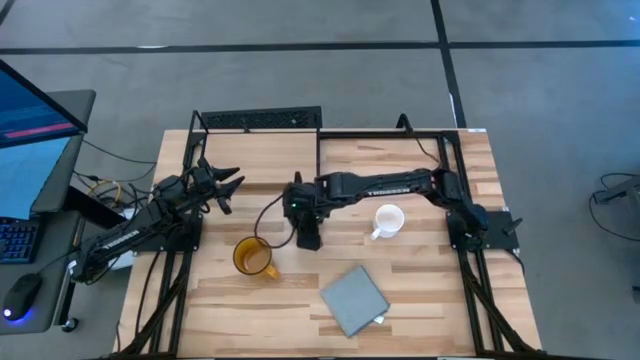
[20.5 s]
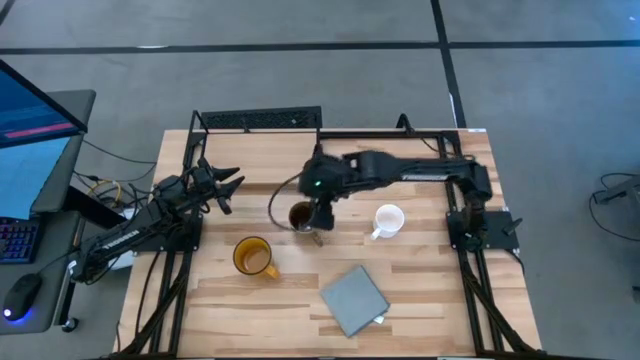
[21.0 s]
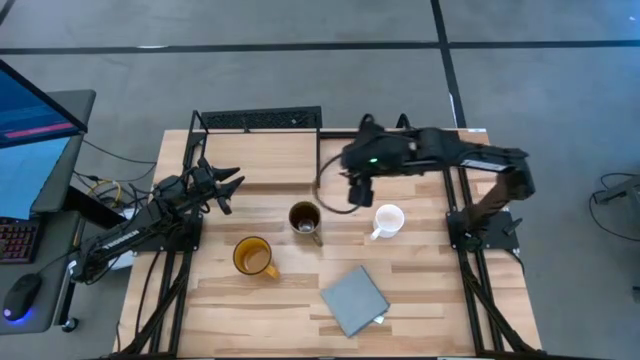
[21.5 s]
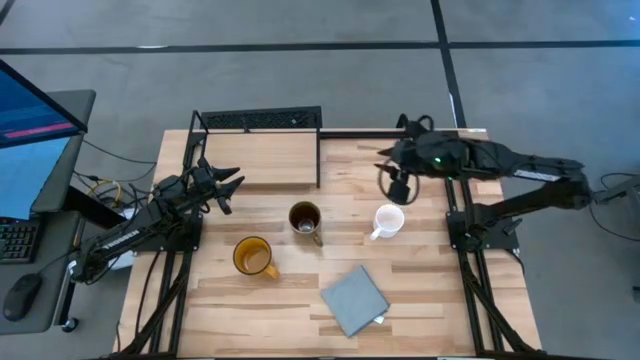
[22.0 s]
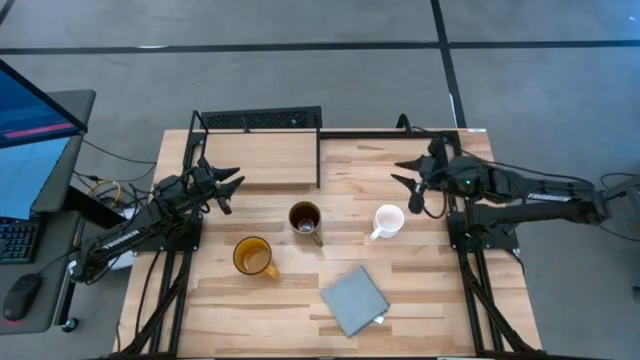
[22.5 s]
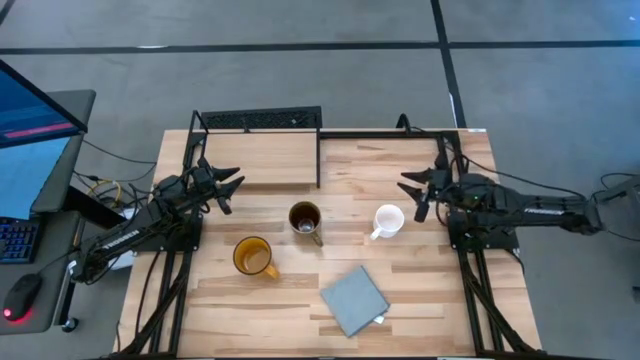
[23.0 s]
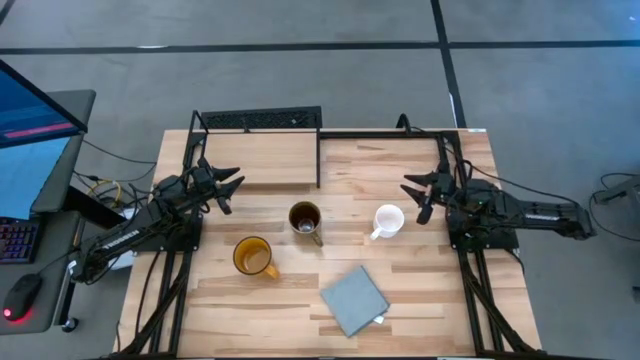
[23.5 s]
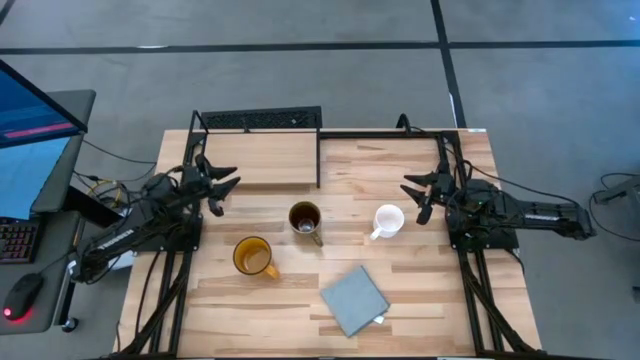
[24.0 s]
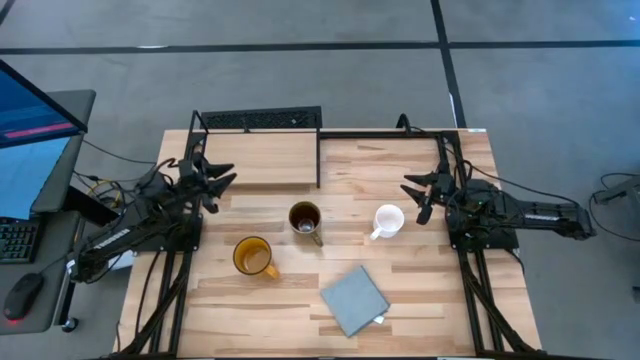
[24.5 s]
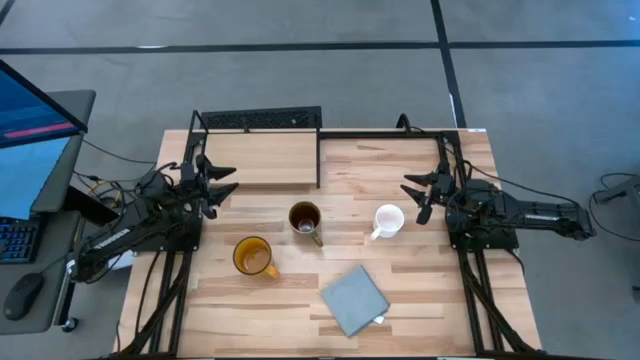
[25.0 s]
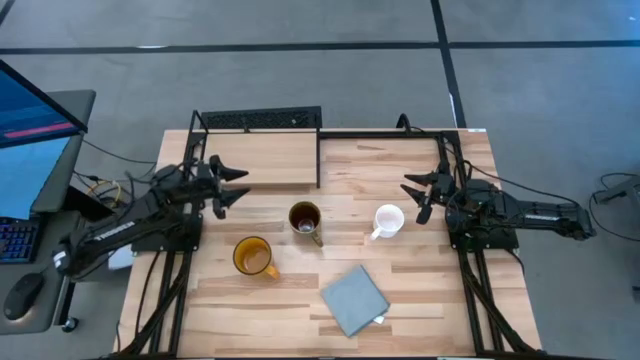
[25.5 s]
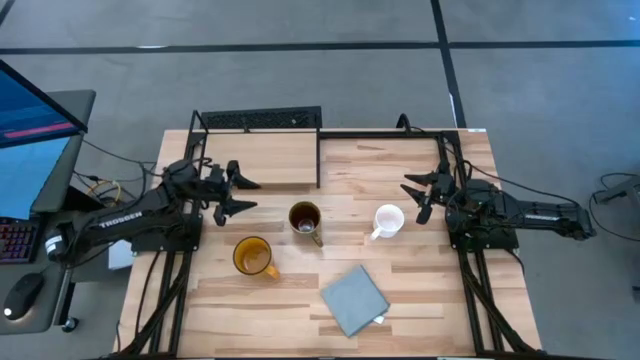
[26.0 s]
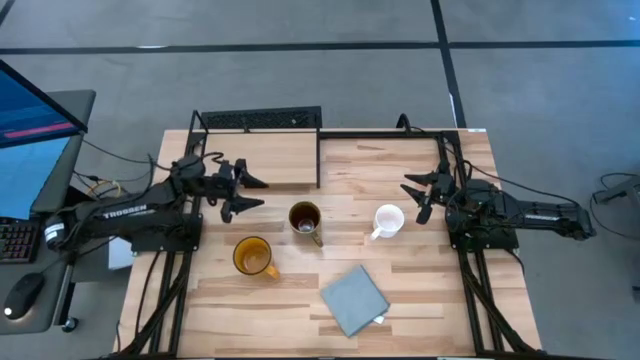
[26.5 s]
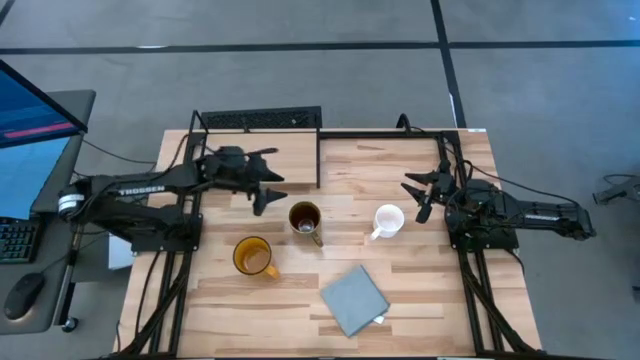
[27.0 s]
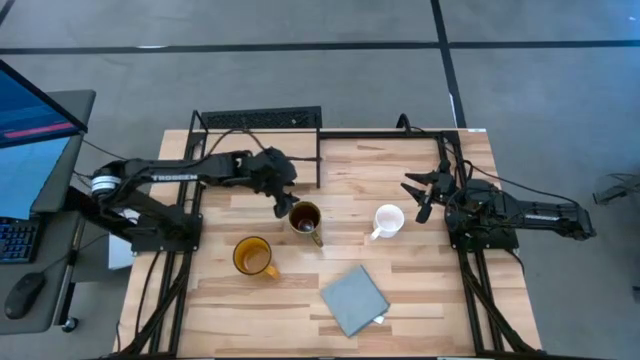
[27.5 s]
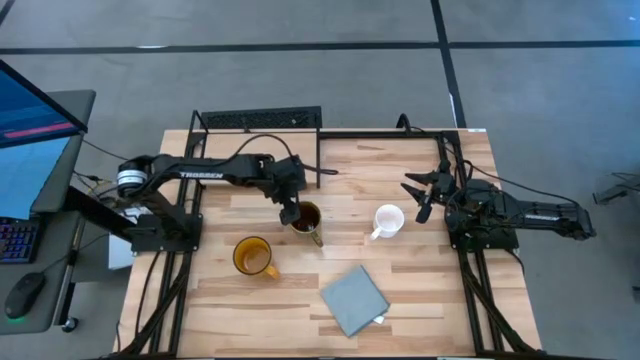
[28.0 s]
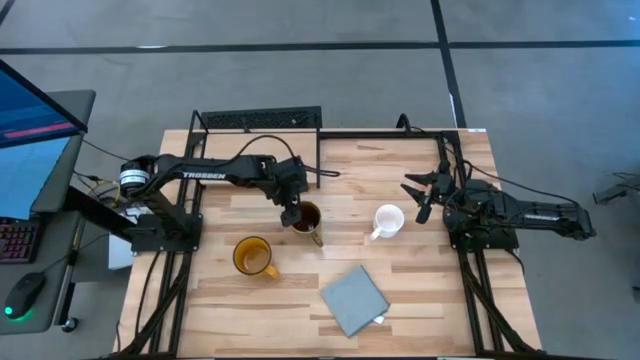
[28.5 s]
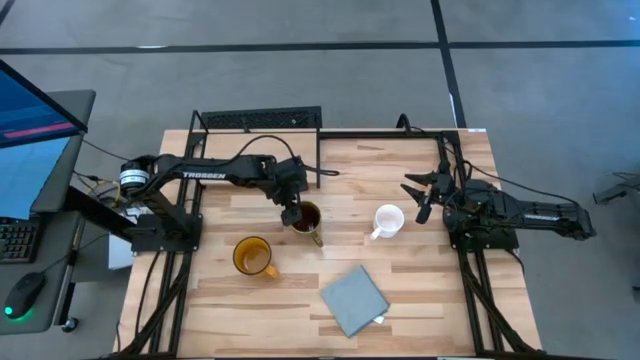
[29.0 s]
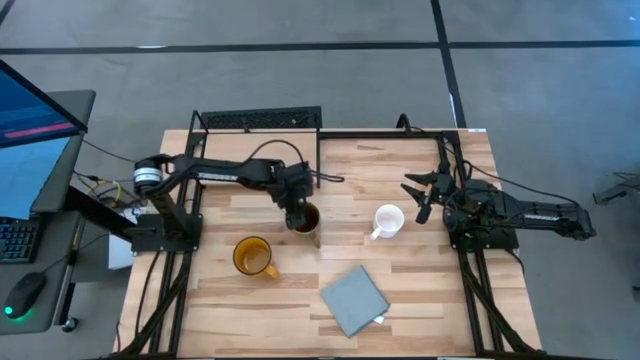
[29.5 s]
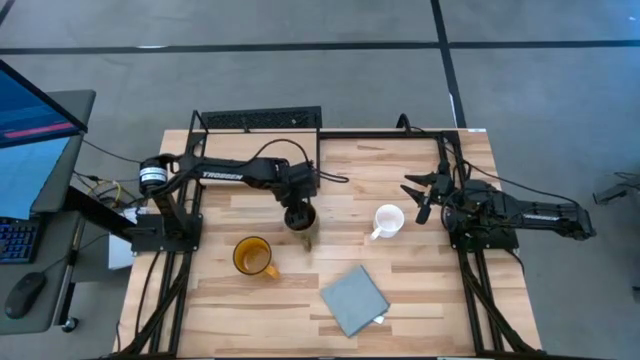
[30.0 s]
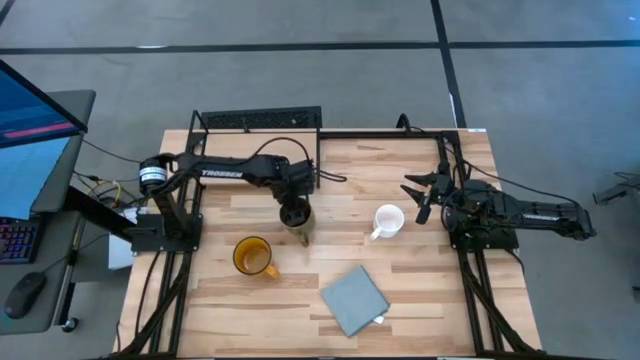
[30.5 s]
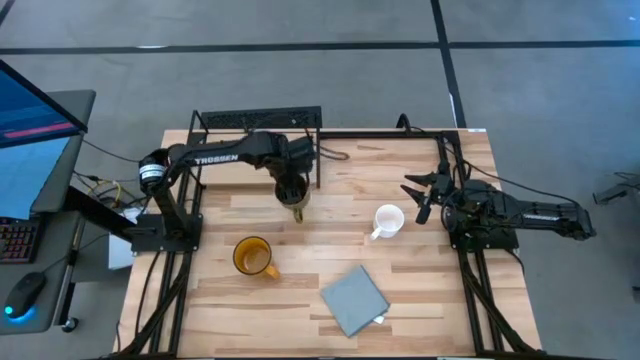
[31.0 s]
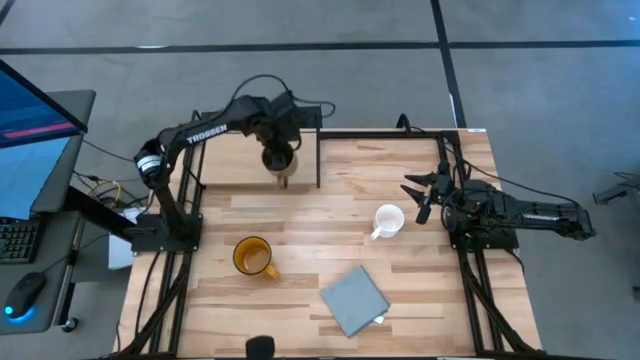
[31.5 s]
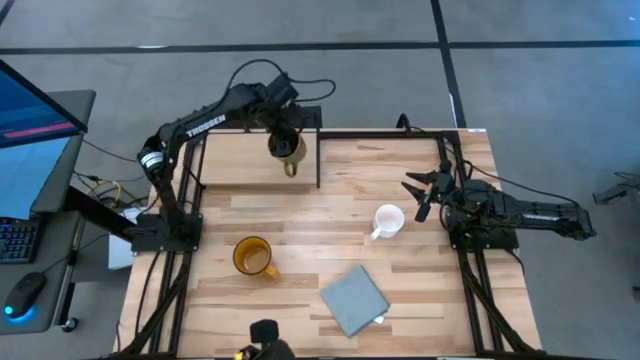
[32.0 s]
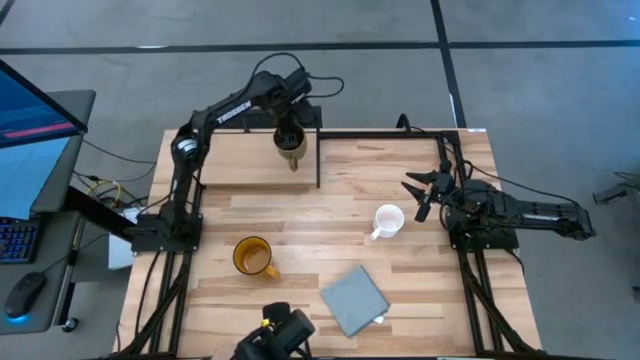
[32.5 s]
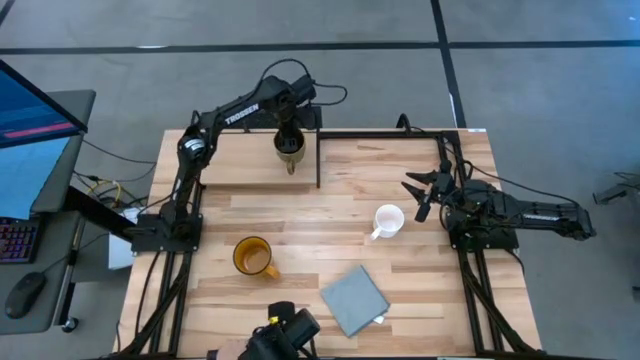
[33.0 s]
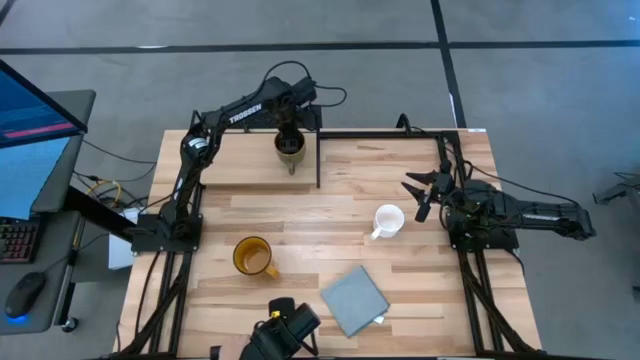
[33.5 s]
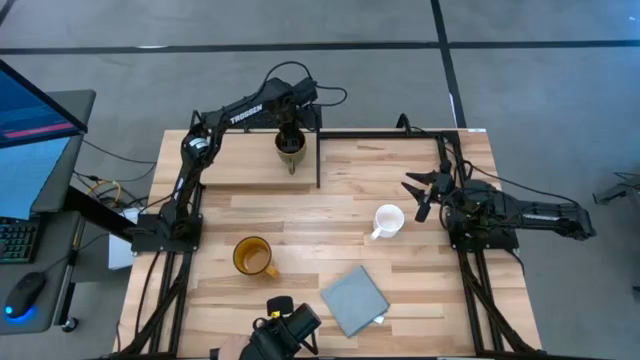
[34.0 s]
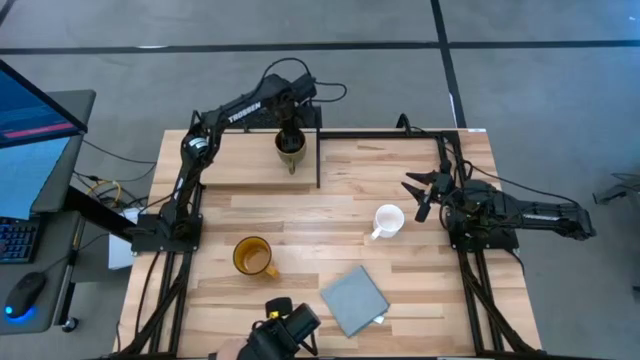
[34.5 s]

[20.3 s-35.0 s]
Task: Stack small to large cups/mugs on shelf
Put the green mug on the shelf

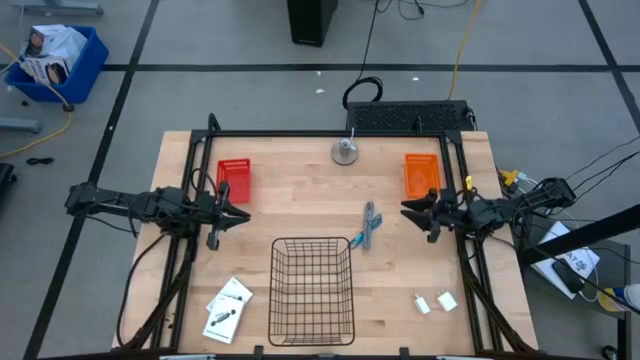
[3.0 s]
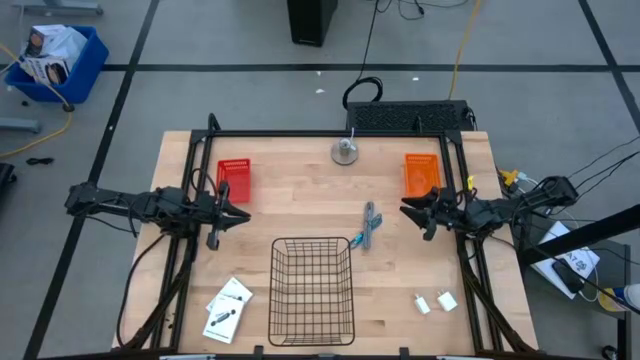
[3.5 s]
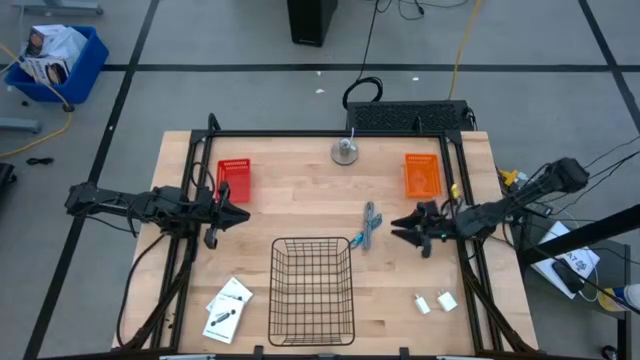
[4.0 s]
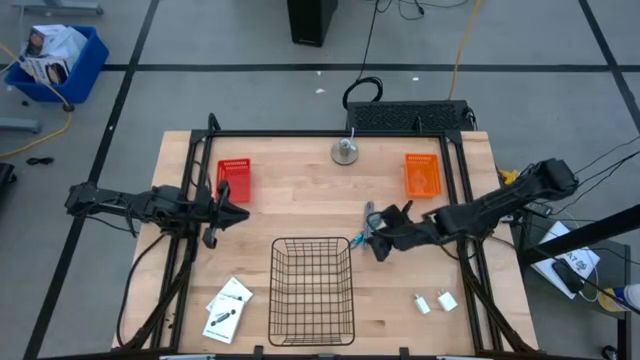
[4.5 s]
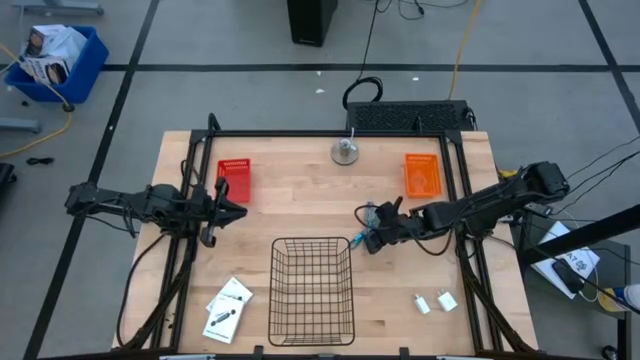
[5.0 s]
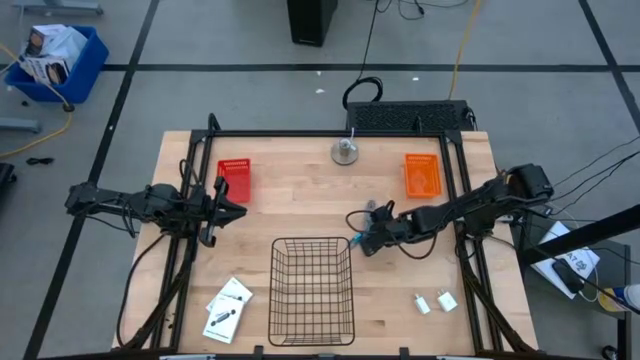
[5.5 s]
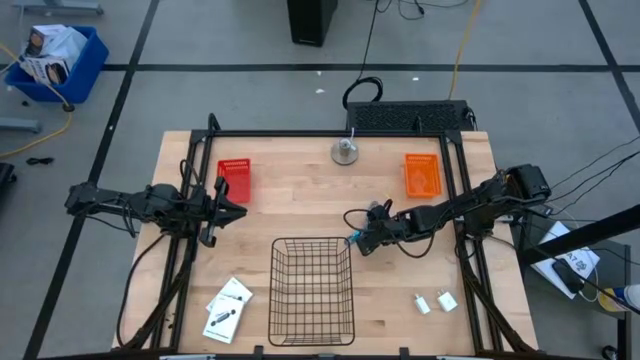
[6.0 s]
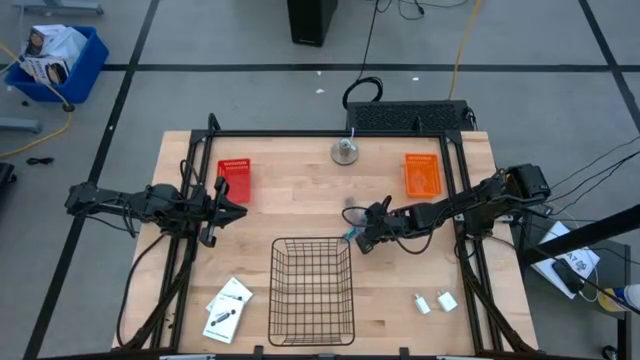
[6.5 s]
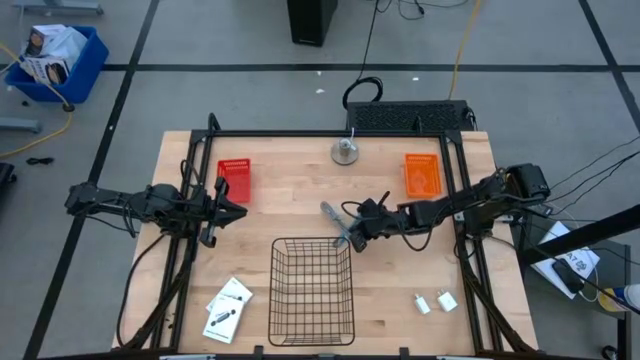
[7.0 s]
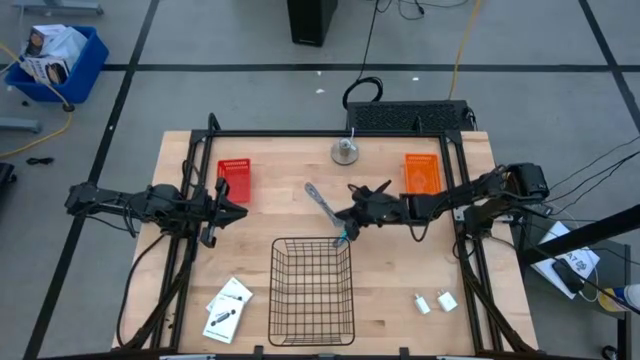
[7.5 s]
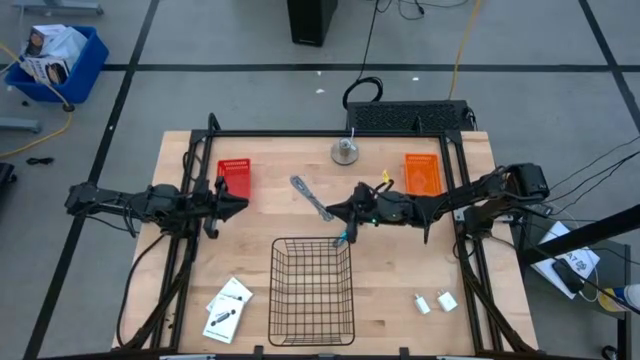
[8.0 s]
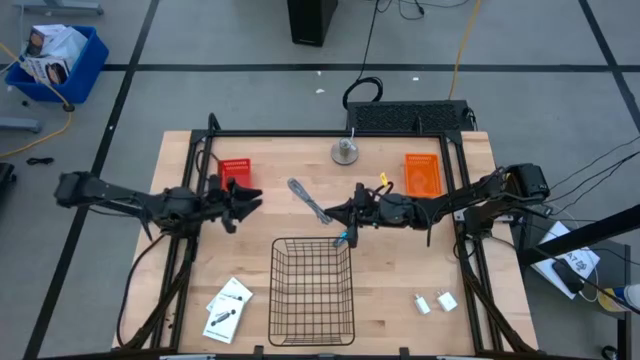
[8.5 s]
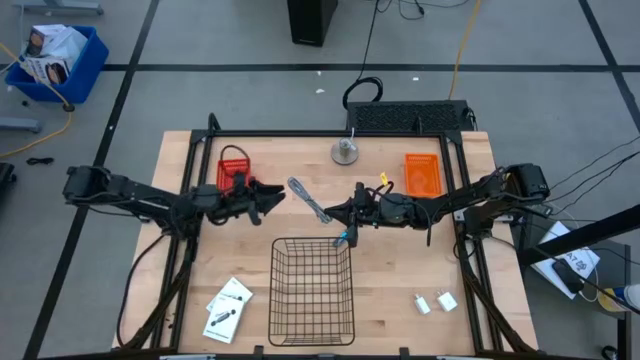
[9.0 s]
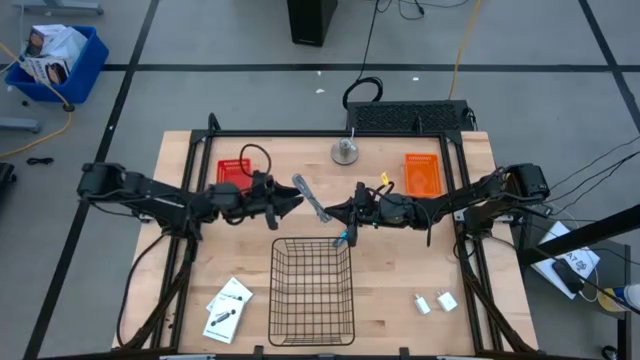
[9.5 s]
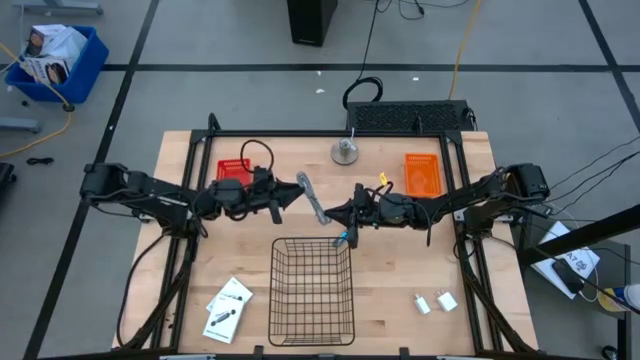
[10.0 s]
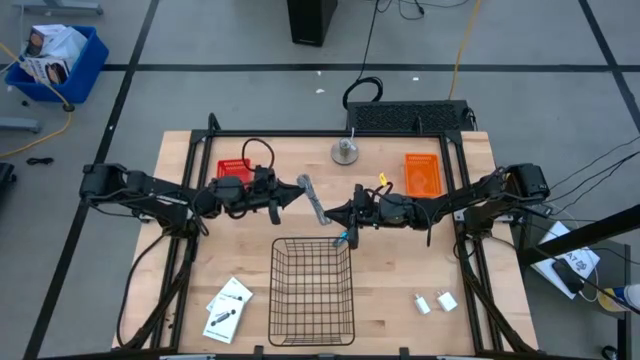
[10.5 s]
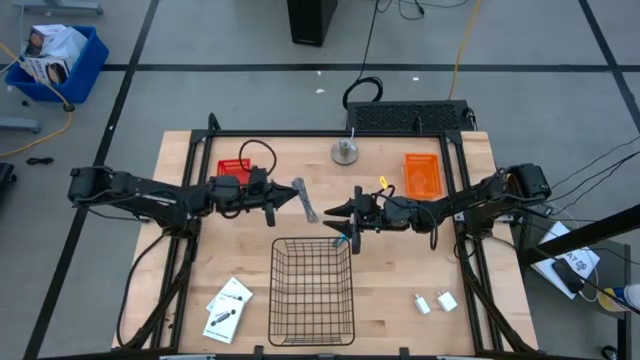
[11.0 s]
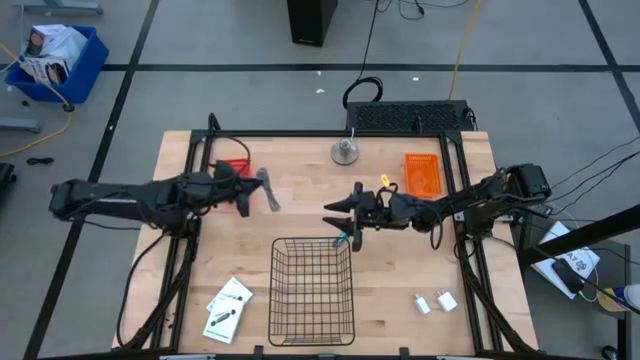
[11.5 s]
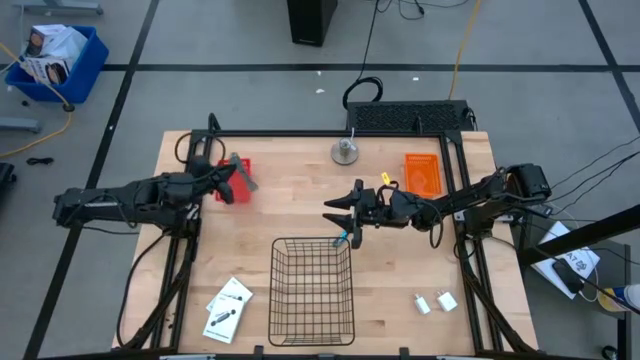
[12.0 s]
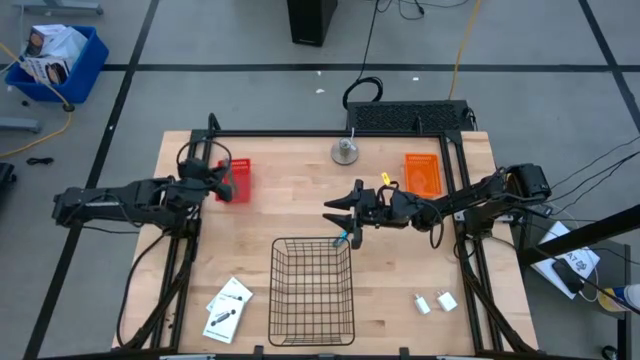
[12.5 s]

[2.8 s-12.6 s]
Task: Pick and place items into bin
Put the black and white charger cable into the red bin
